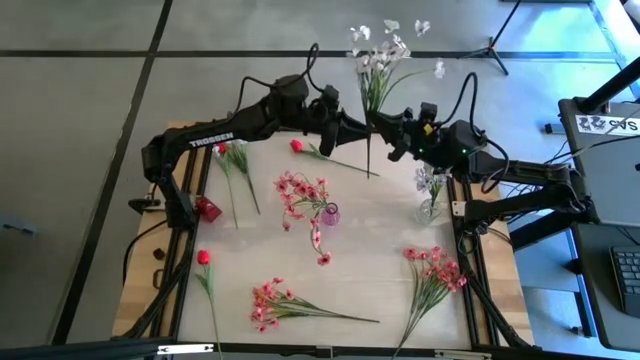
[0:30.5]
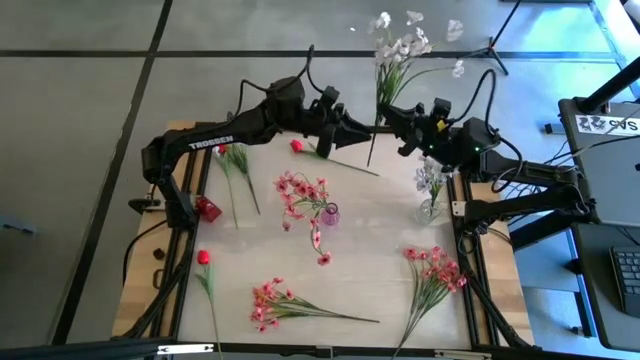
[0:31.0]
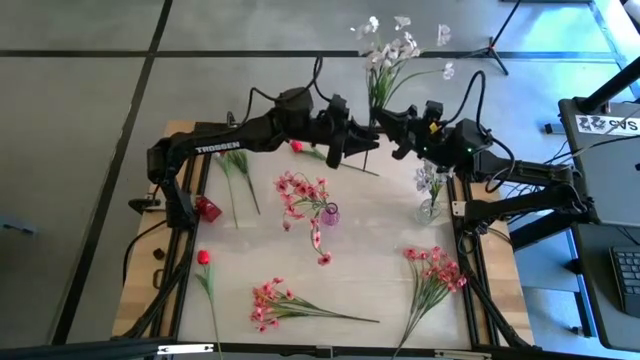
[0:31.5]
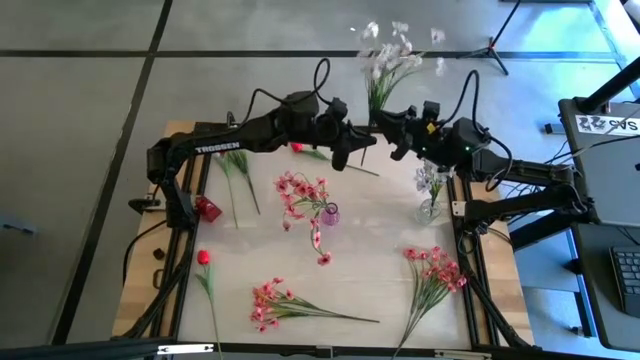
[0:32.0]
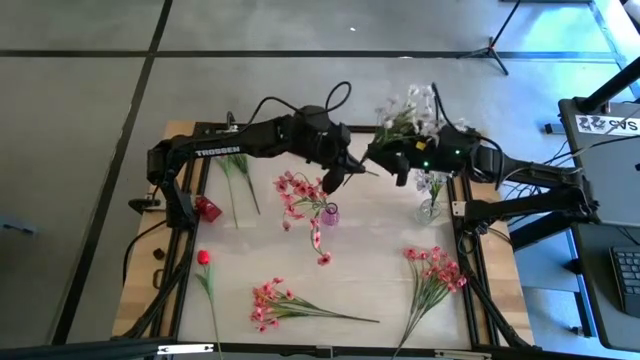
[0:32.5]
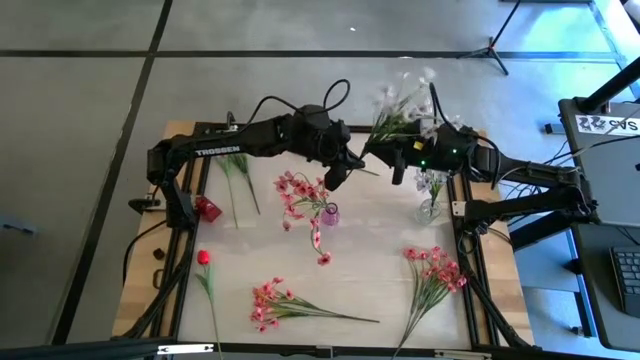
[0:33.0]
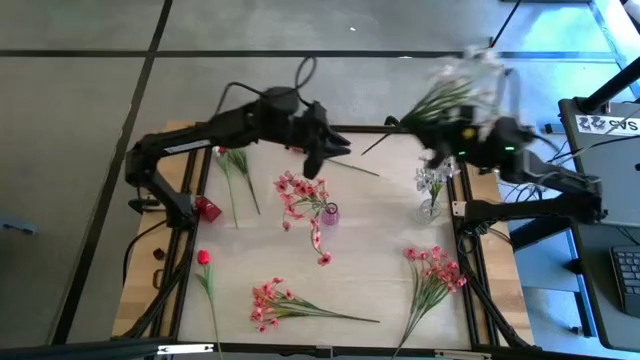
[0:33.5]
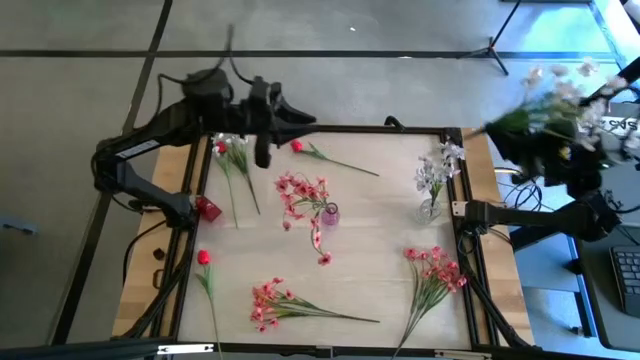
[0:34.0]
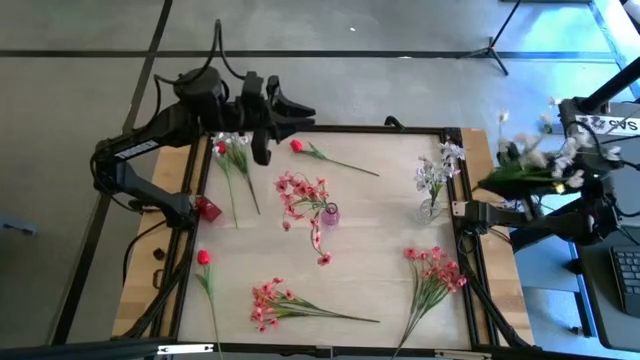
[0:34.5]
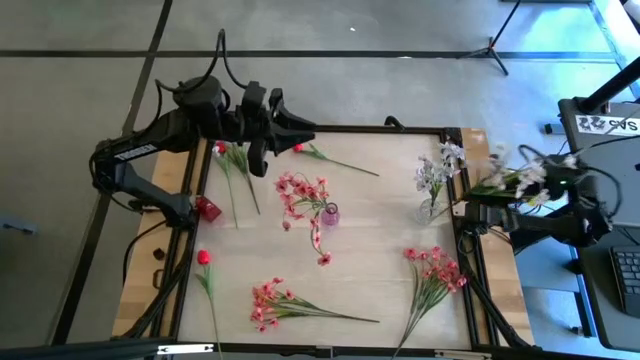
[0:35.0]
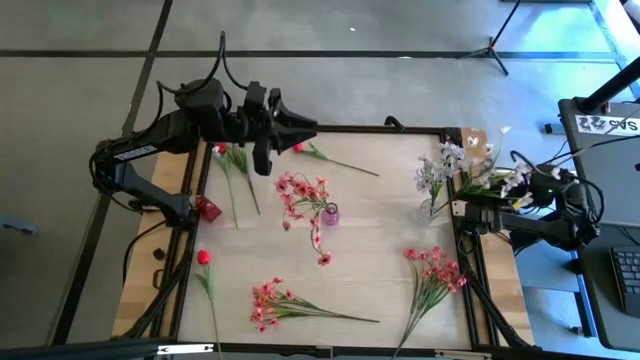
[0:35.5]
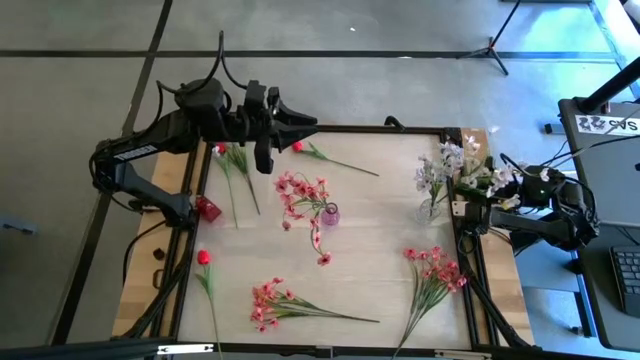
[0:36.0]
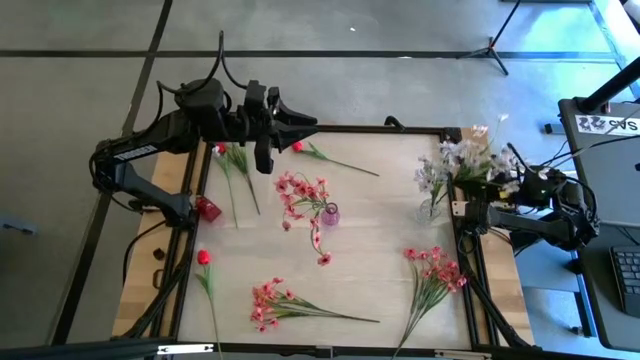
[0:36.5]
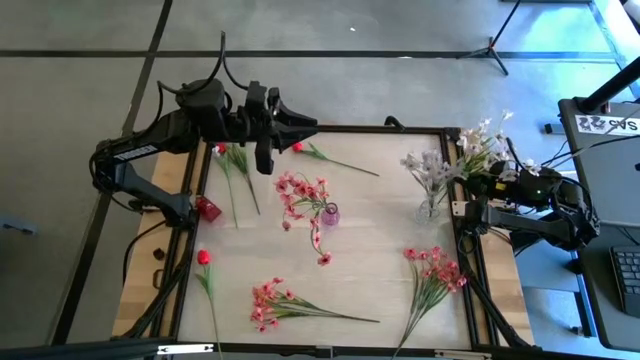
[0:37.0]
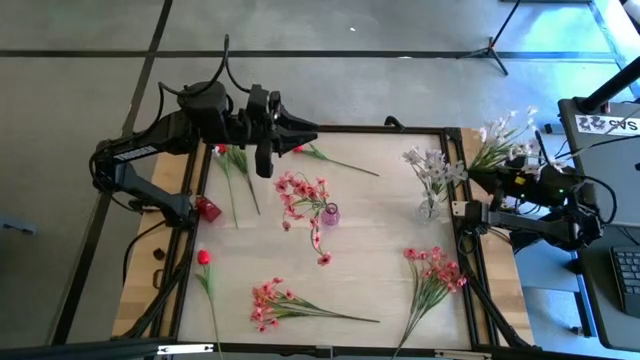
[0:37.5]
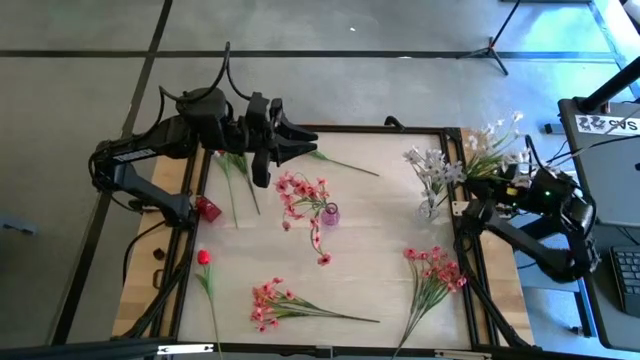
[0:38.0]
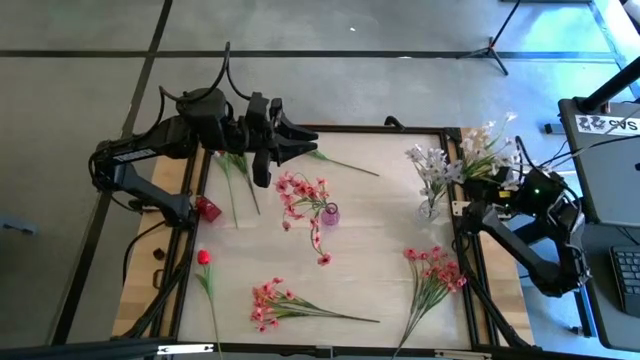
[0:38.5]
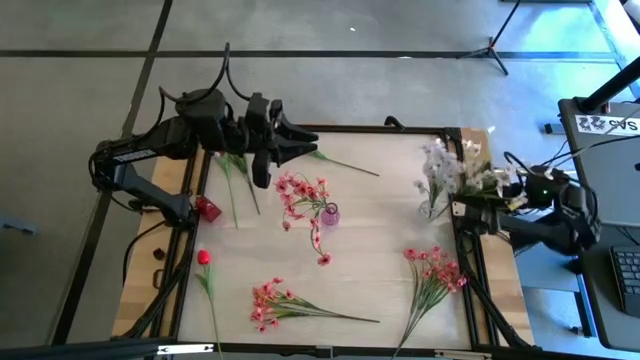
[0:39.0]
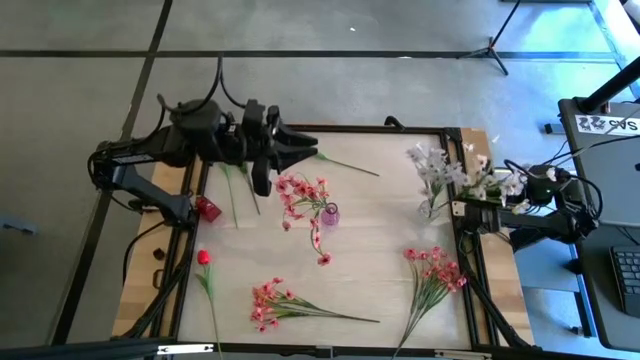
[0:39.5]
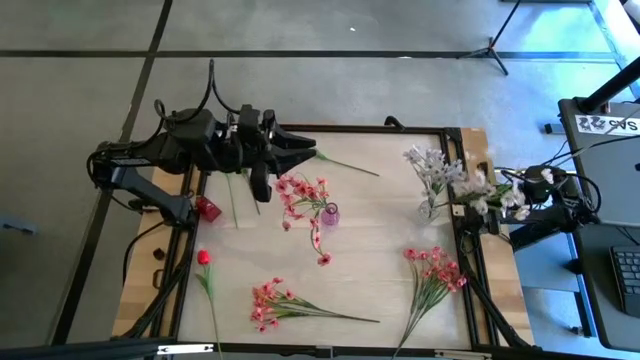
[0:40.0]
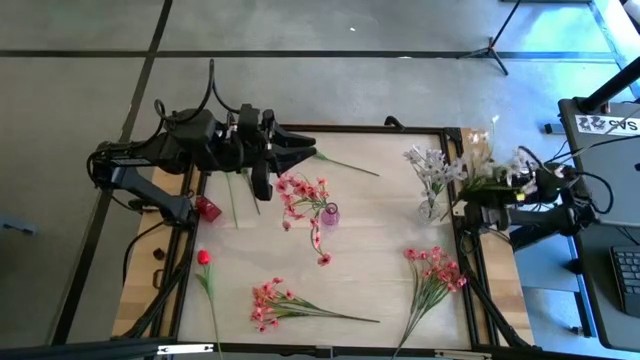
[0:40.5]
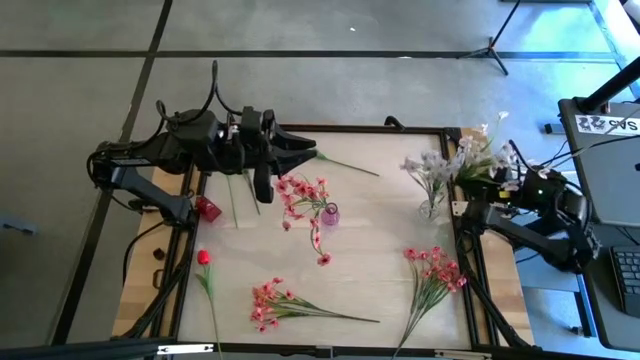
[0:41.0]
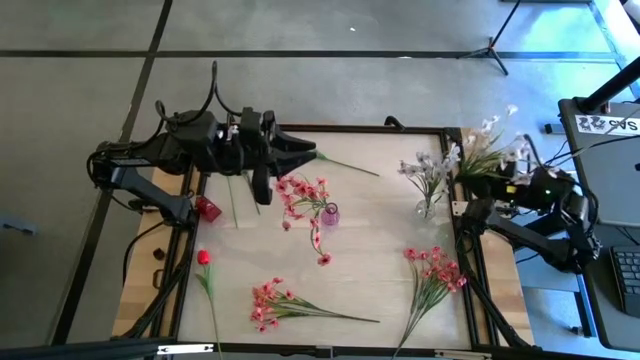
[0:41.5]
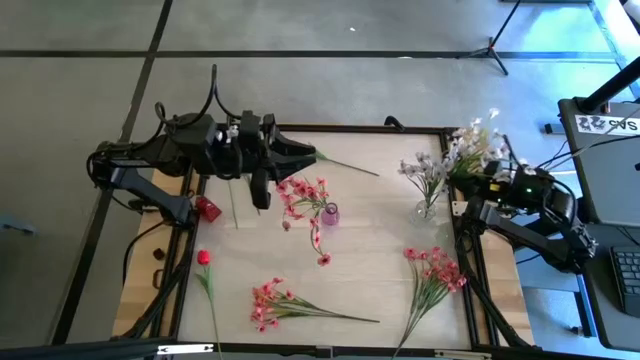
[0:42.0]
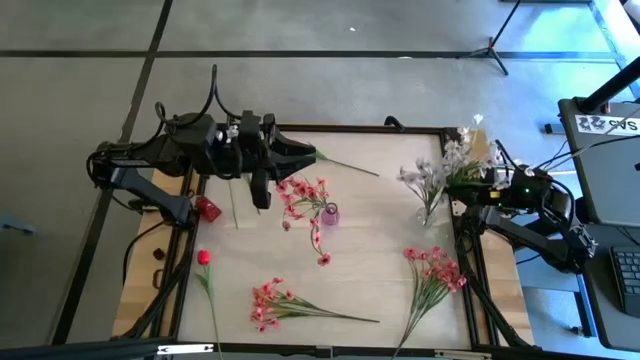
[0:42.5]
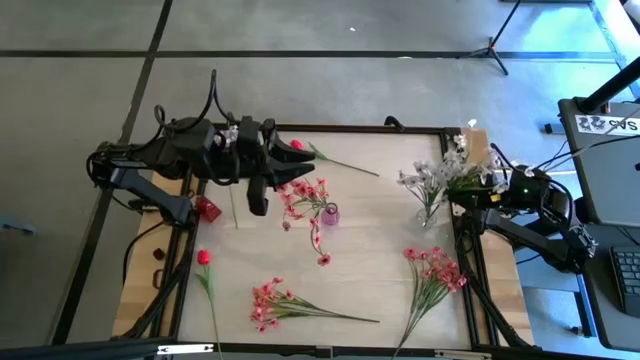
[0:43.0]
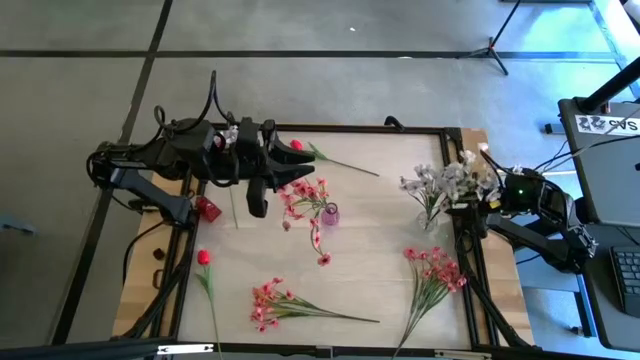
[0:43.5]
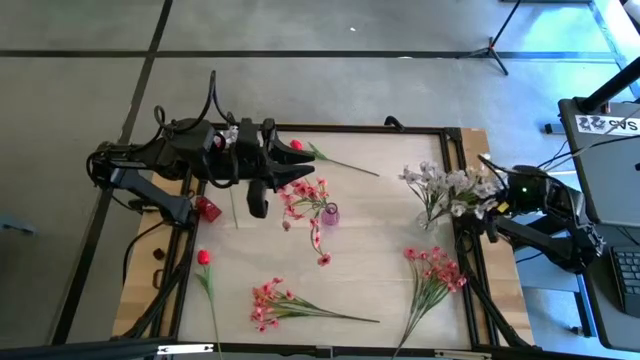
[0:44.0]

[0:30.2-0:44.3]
Task: Sort flowers into vase by color
Put the right white flowers into the transparent vase

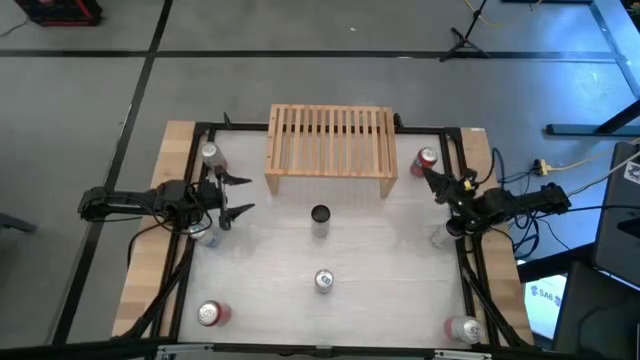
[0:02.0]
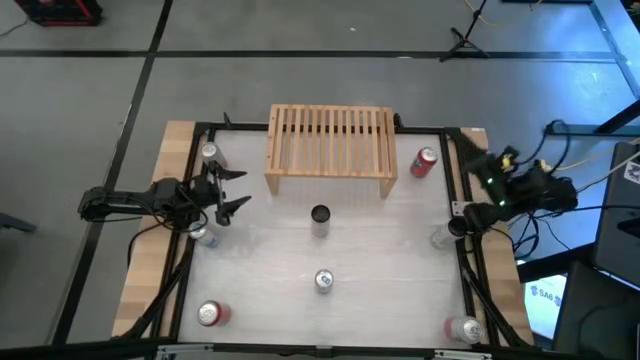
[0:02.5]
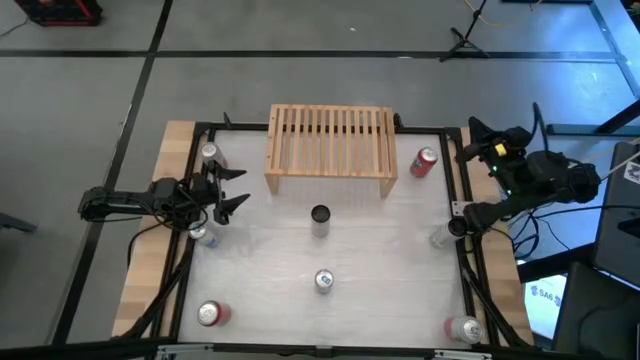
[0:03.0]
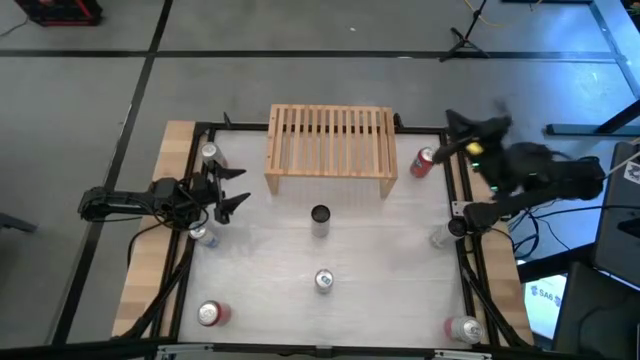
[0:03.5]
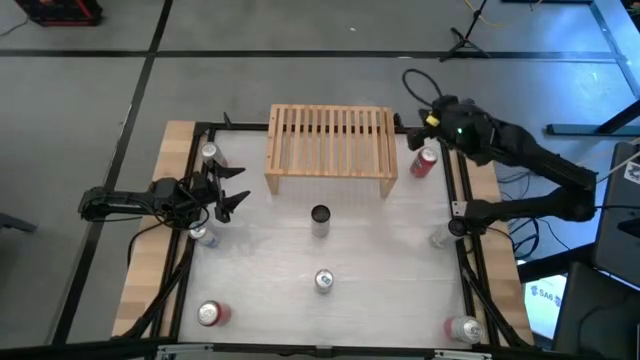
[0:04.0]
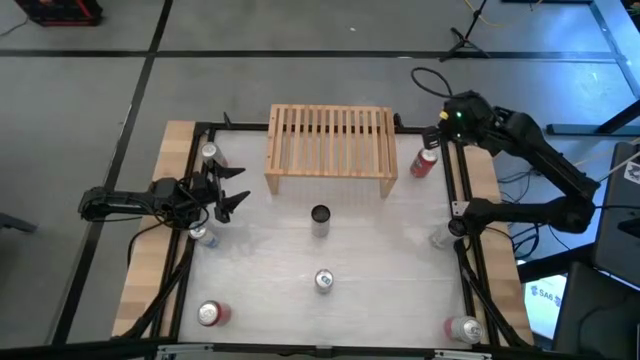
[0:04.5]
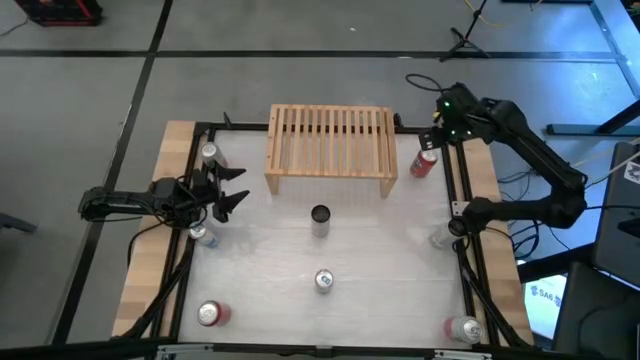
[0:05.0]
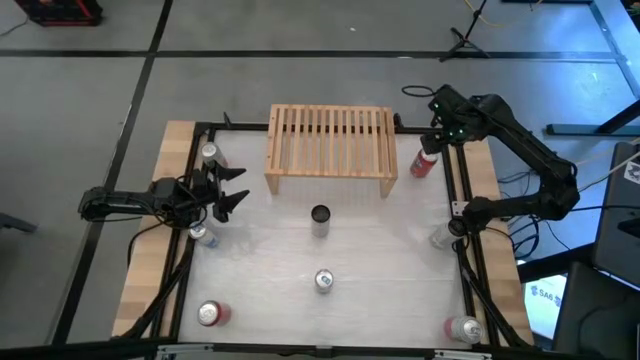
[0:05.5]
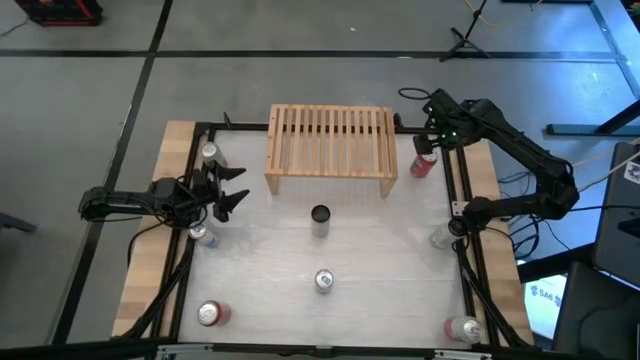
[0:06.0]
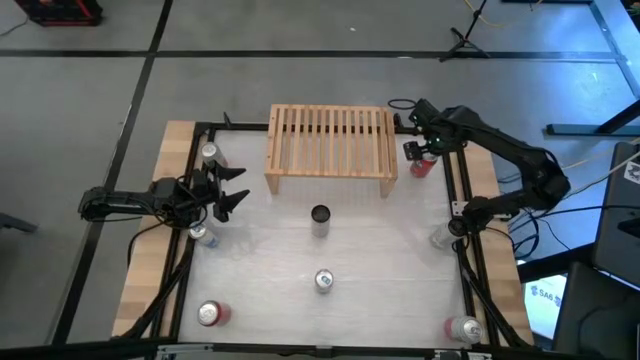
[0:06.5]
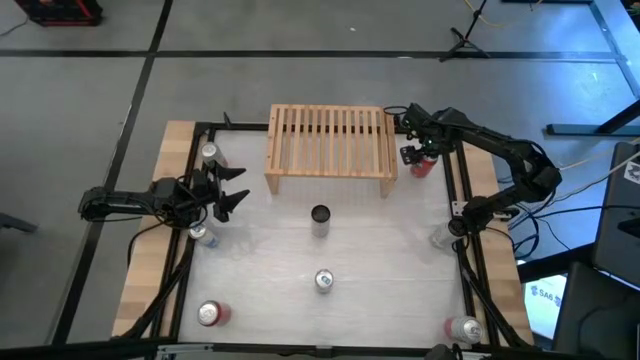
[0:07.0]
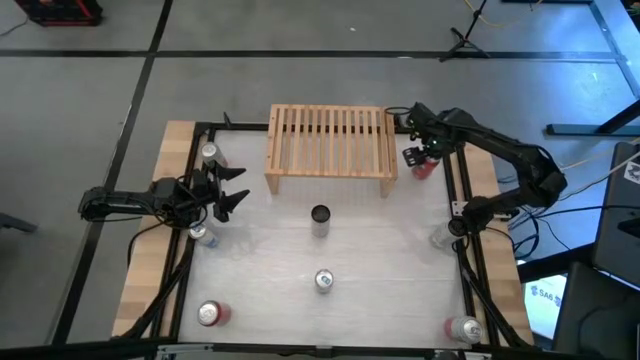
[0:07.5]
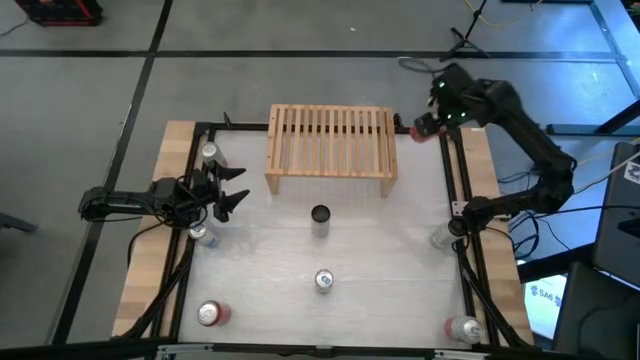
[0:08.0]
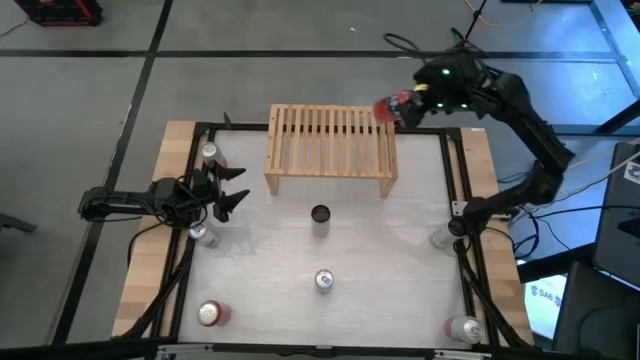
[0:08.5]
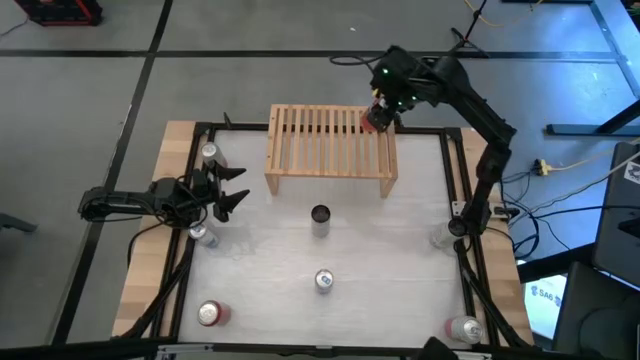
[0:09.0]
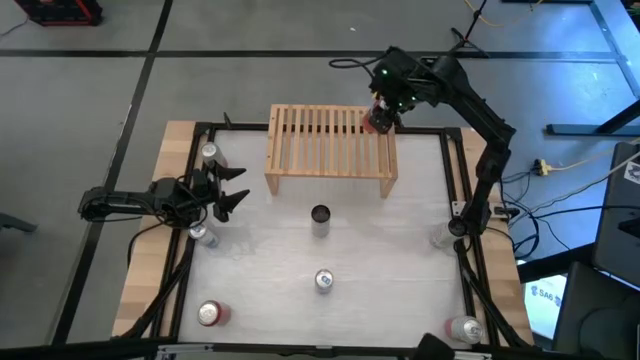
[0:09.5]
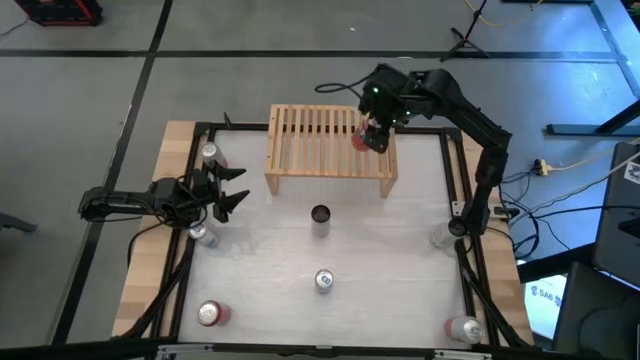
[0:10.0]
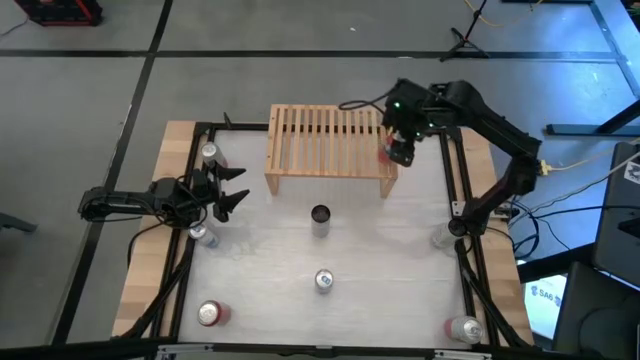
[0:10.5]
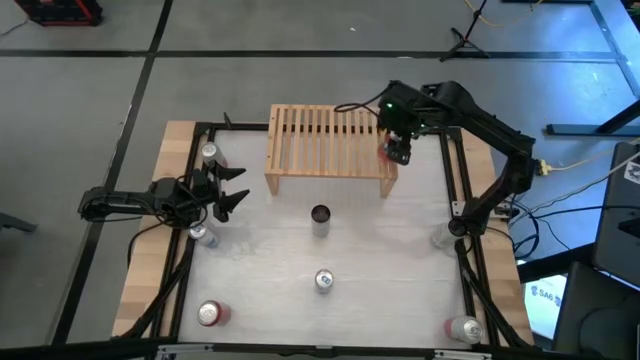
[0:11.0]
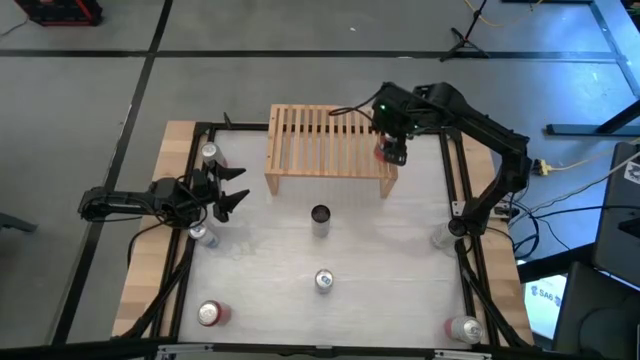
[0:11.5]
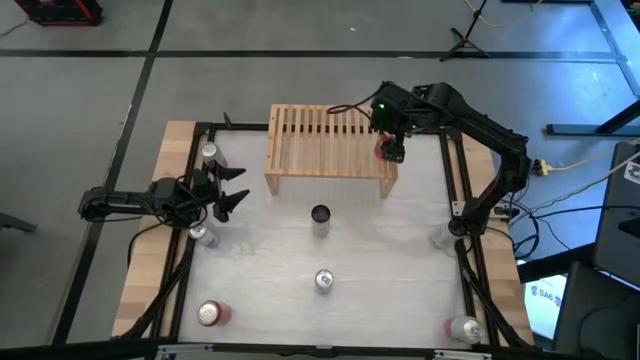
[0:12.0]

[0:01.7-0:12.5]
Task: Place canned beverage on shelf
Put the top red soda can on the shelf
